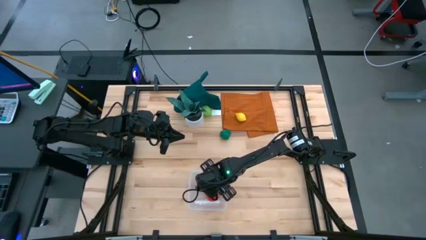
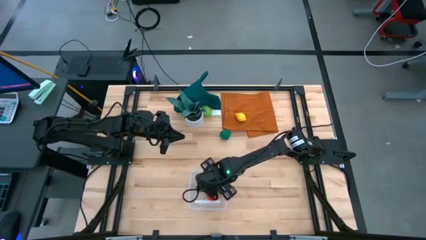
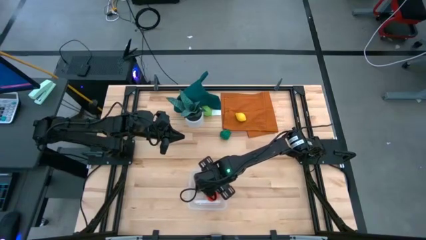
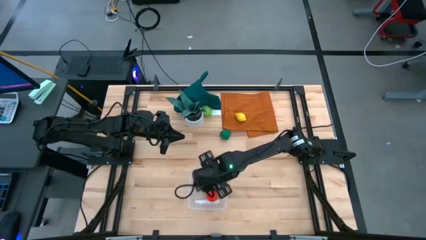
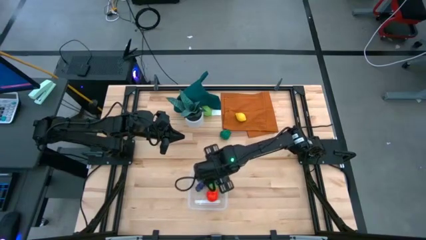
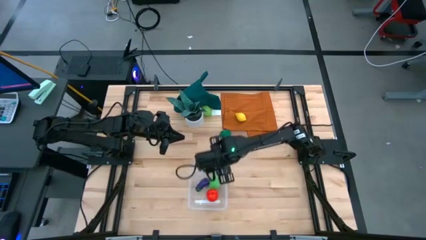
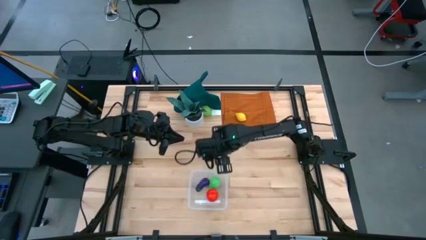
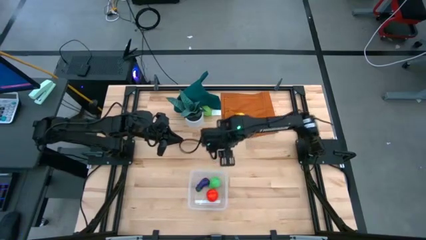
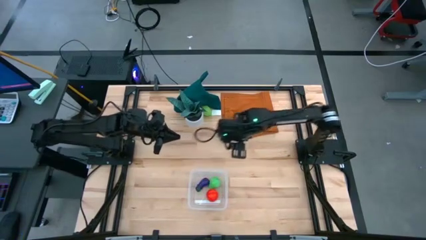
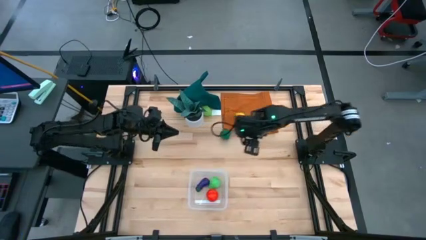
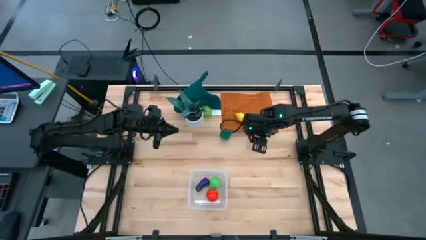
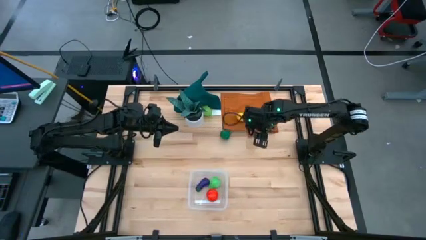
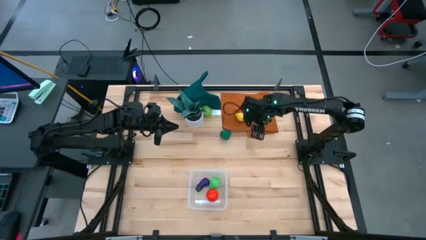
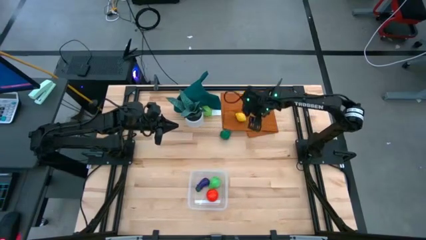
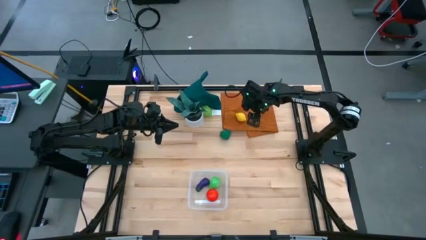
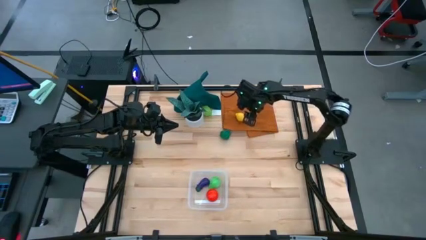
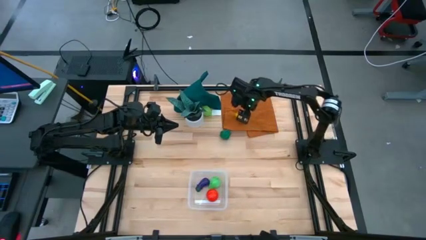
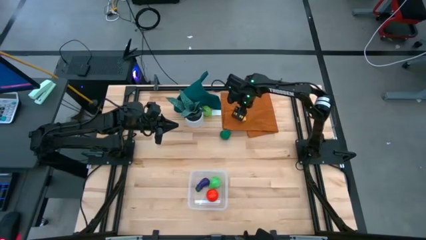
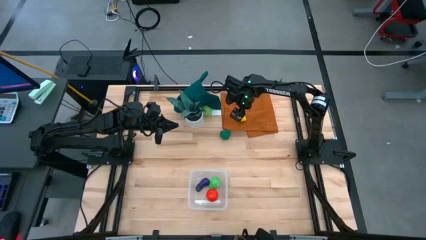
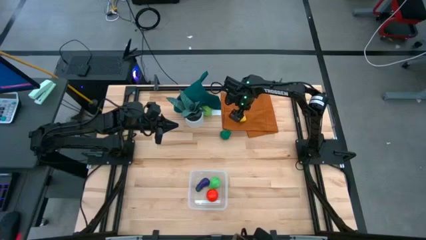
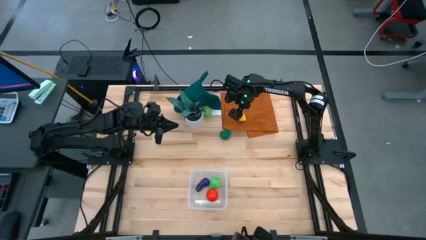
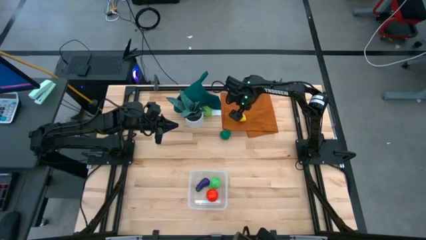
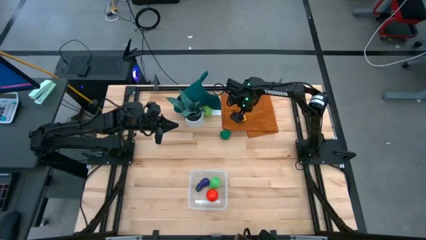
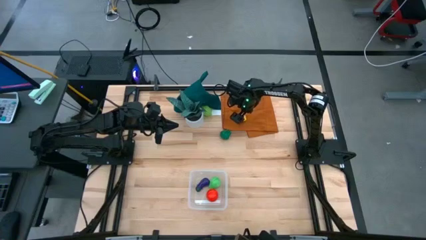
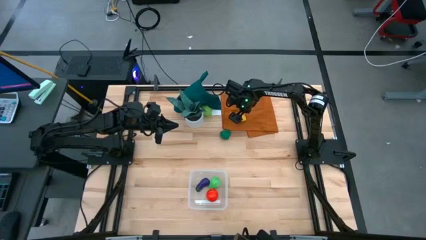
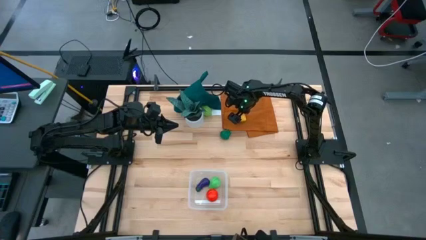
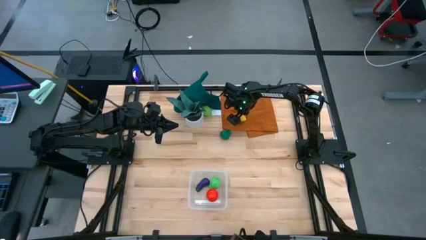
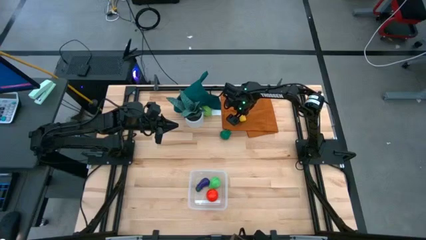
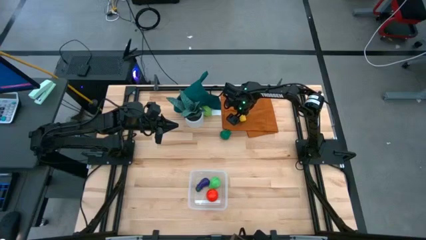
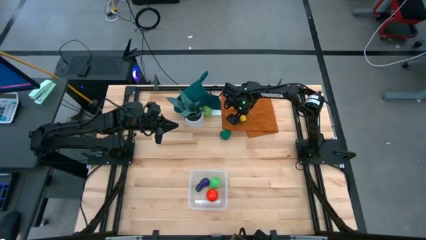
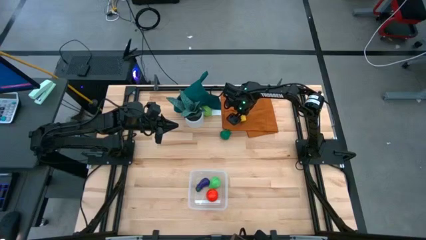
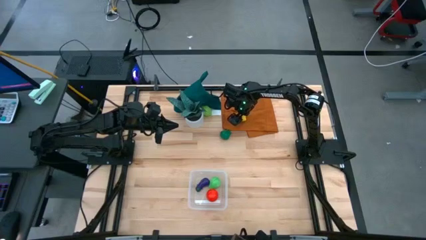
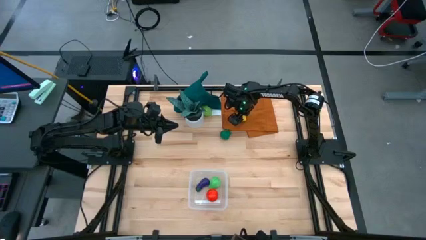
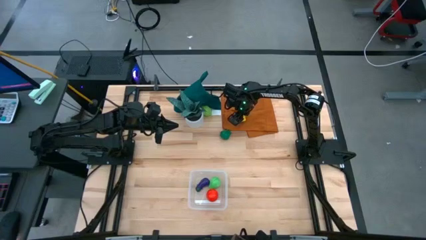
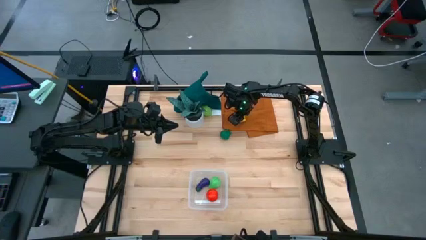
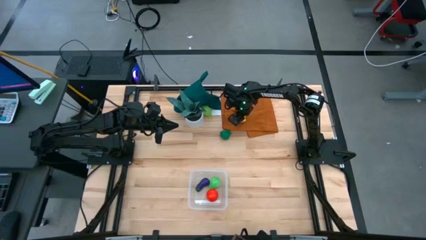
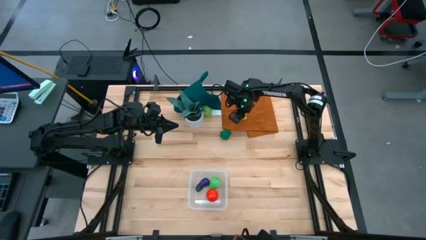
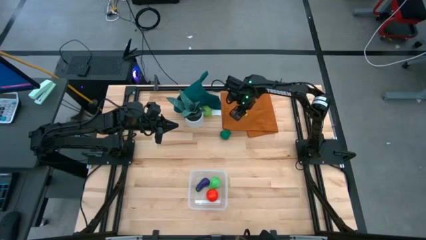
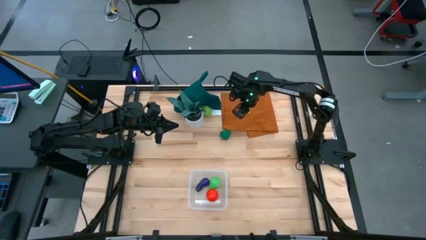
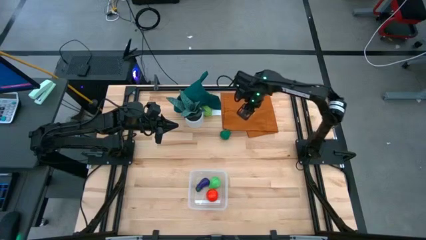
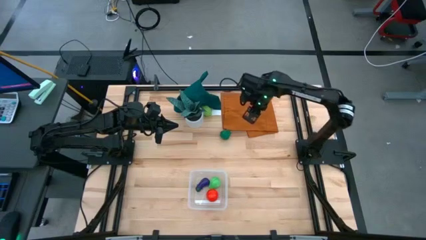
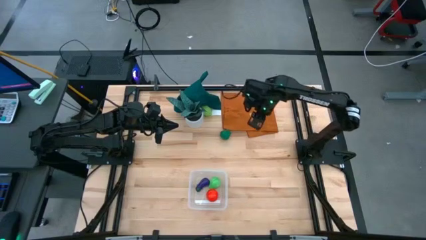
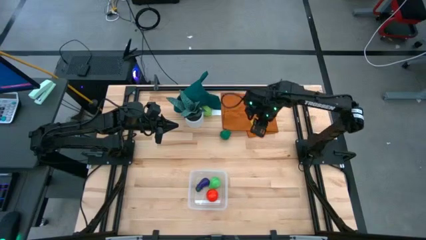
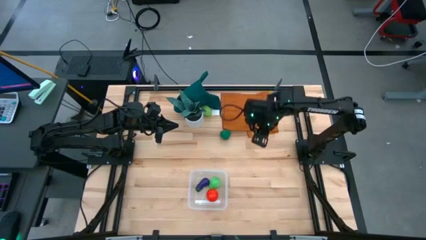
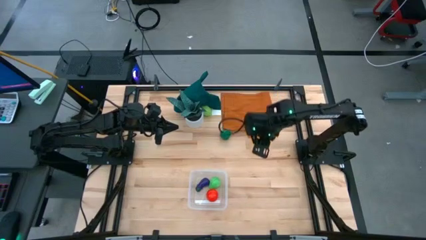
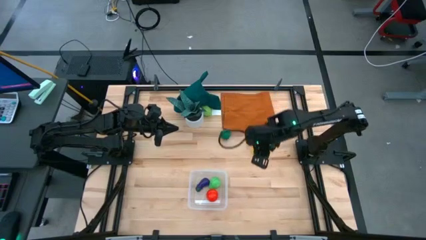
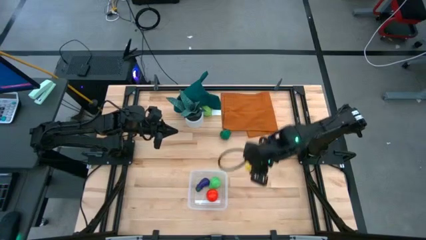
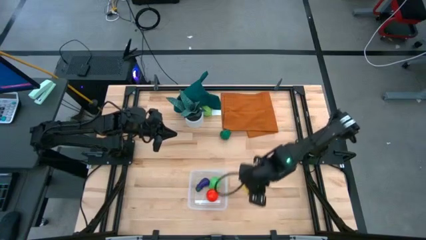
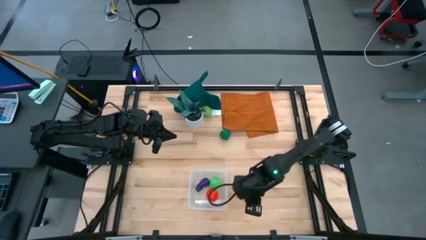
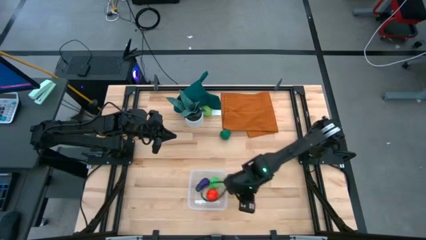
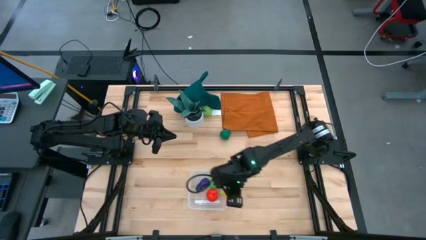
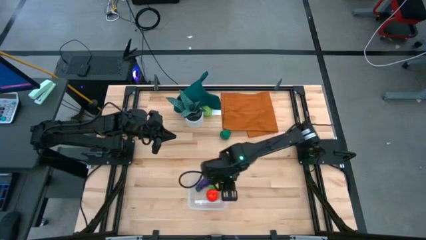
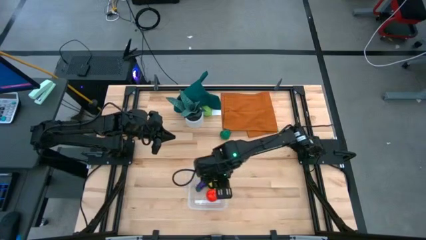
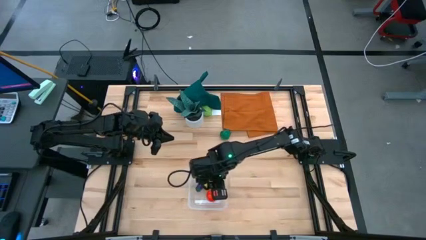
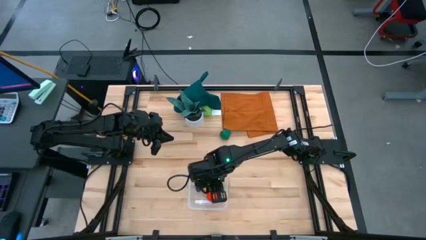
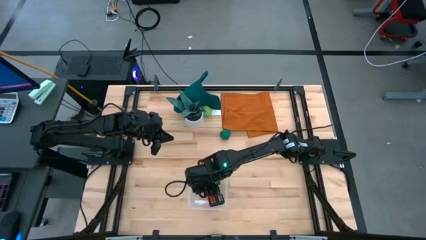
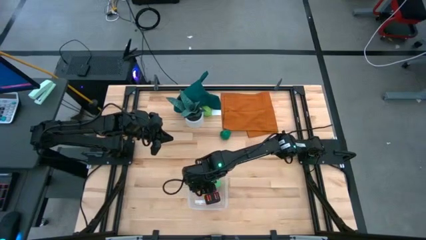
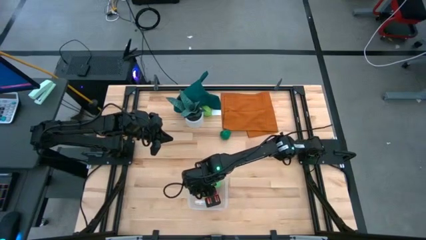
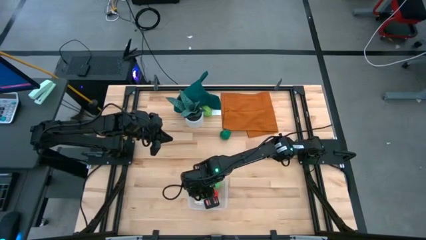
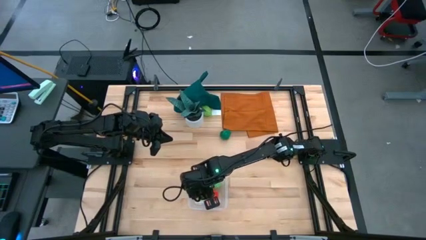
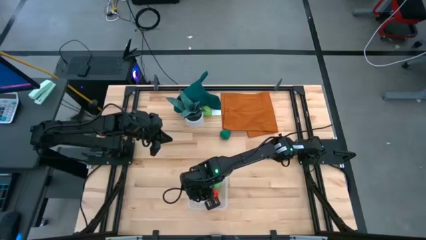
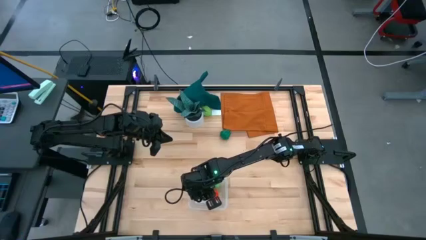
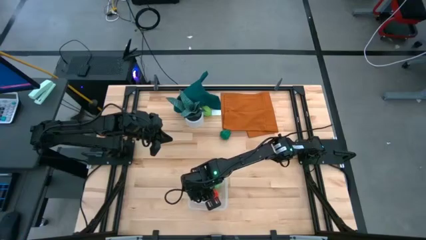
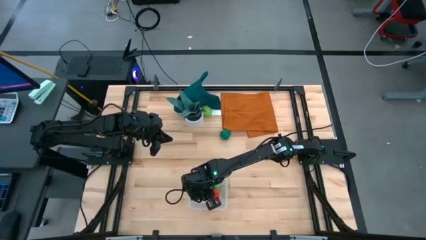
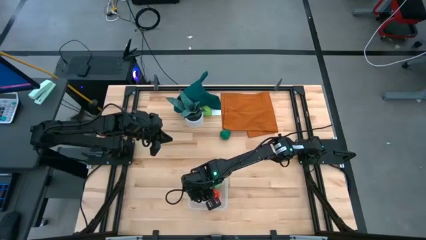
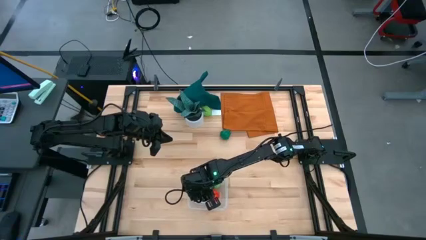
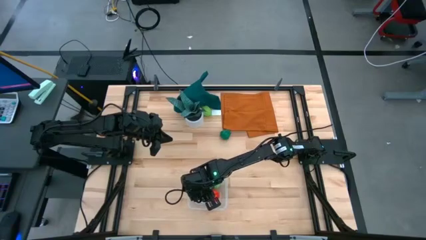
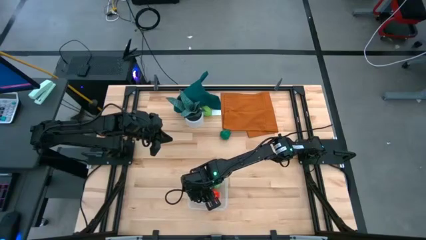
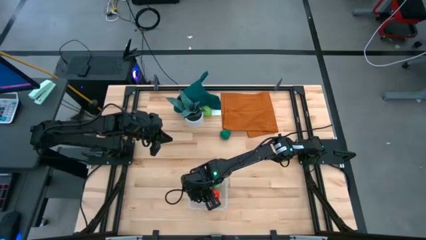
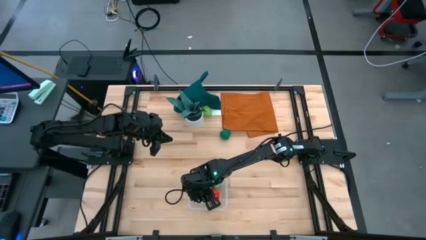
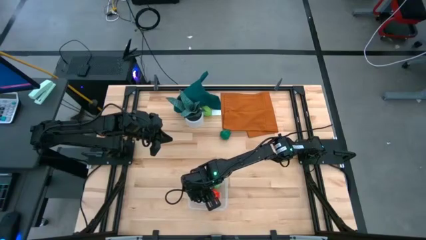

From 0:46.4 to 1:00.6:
Task: Pick and placing Produce into tupperware
Put the lemon into the transparent bin
